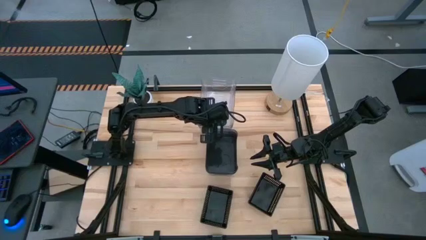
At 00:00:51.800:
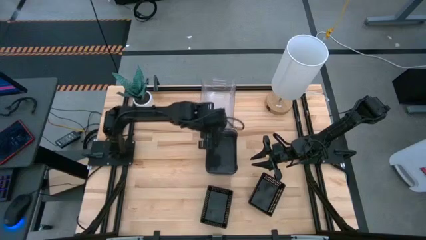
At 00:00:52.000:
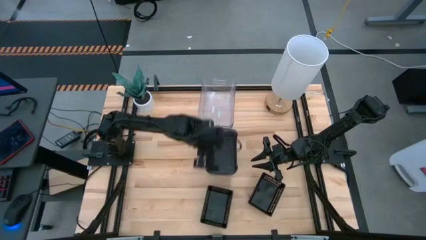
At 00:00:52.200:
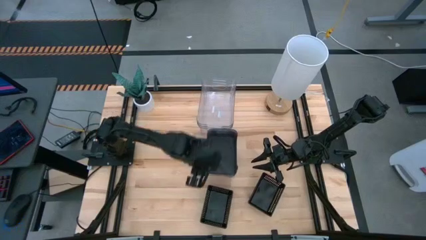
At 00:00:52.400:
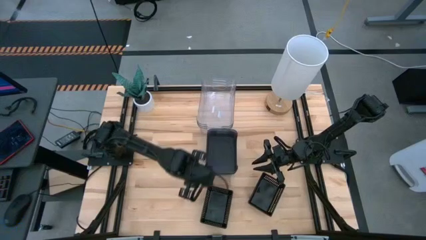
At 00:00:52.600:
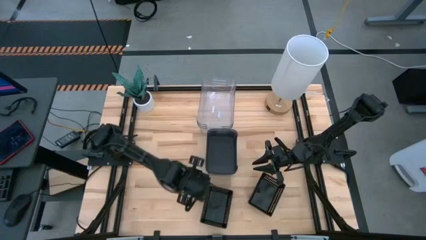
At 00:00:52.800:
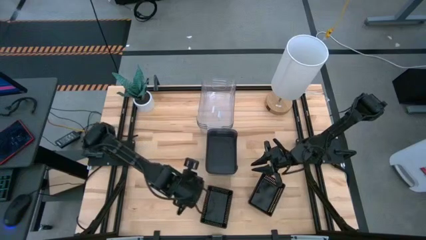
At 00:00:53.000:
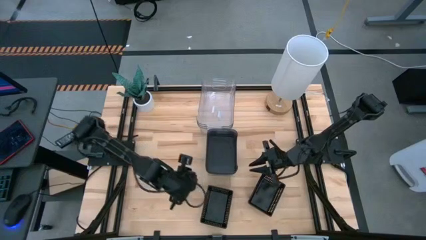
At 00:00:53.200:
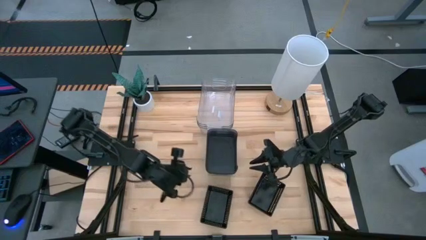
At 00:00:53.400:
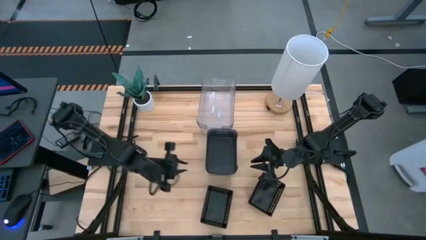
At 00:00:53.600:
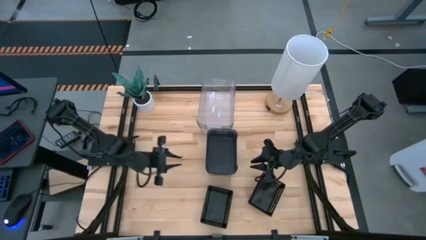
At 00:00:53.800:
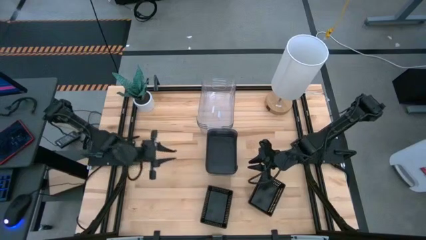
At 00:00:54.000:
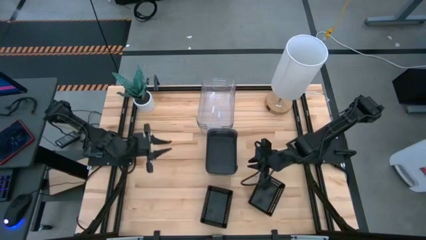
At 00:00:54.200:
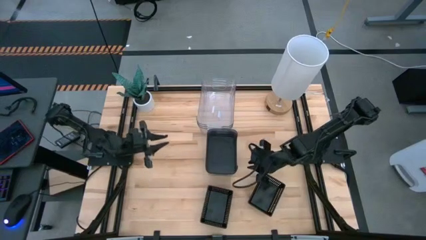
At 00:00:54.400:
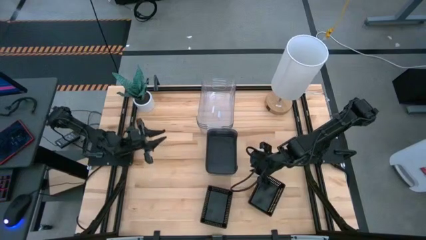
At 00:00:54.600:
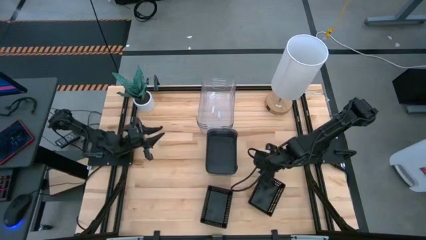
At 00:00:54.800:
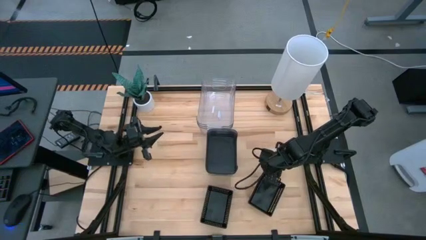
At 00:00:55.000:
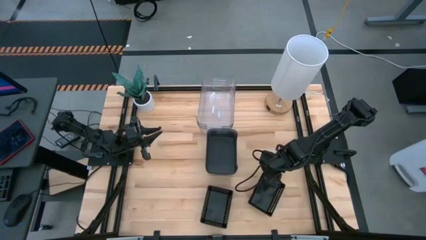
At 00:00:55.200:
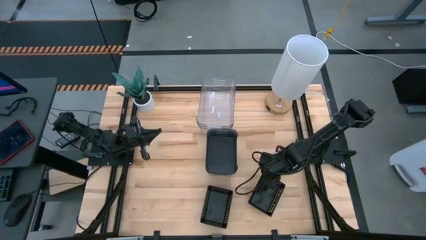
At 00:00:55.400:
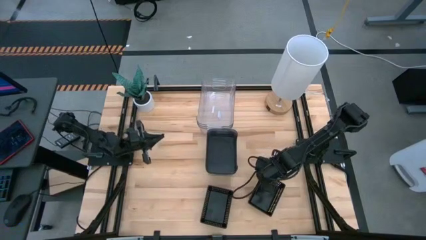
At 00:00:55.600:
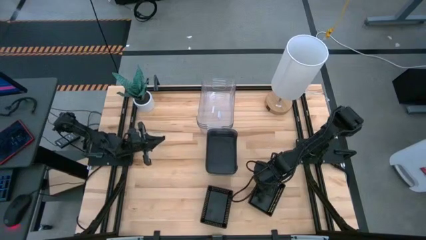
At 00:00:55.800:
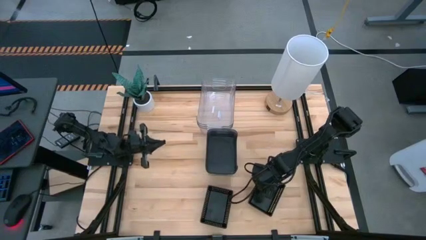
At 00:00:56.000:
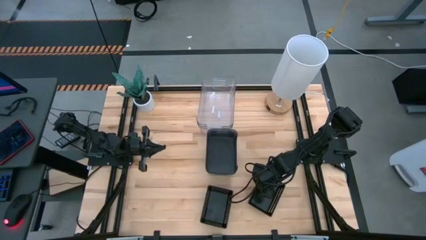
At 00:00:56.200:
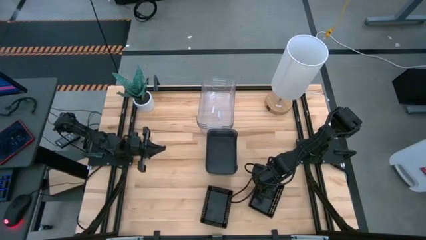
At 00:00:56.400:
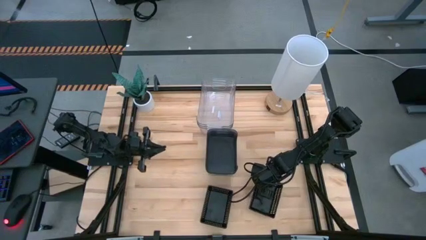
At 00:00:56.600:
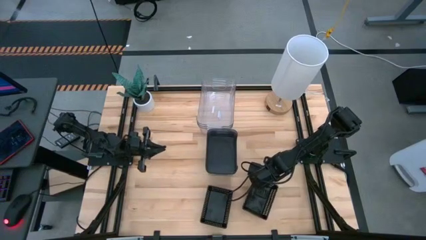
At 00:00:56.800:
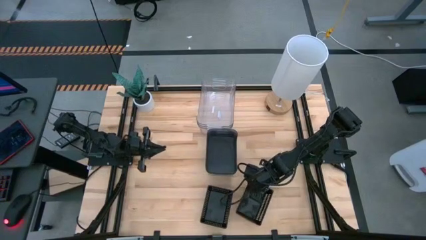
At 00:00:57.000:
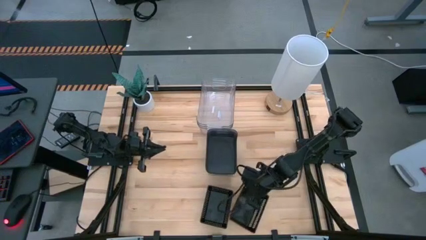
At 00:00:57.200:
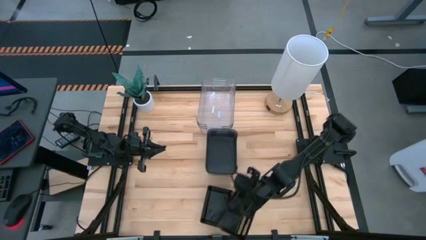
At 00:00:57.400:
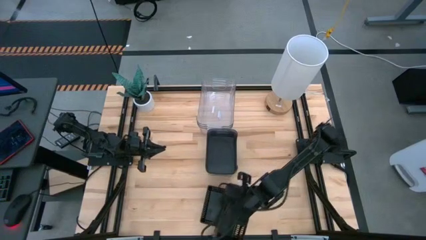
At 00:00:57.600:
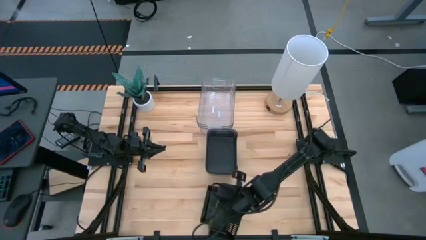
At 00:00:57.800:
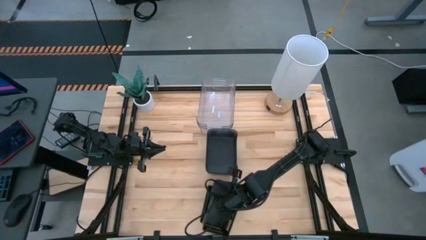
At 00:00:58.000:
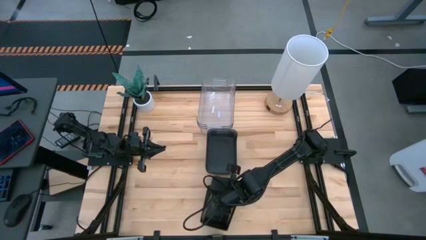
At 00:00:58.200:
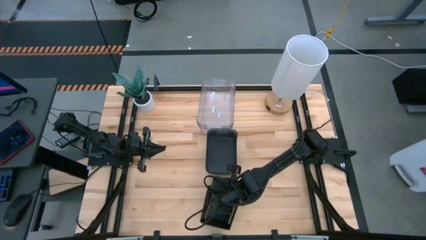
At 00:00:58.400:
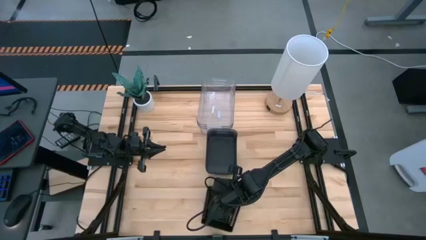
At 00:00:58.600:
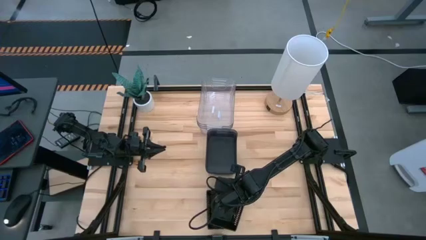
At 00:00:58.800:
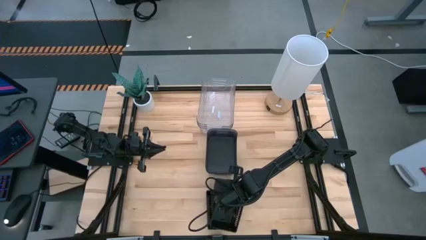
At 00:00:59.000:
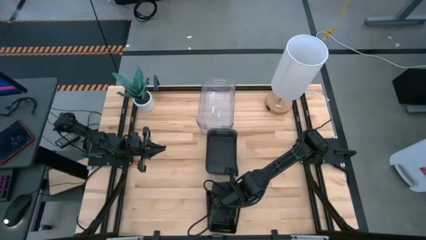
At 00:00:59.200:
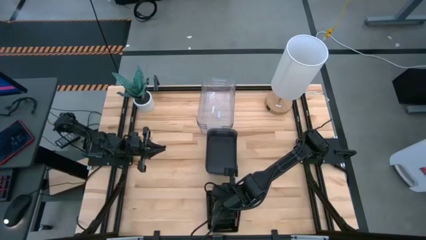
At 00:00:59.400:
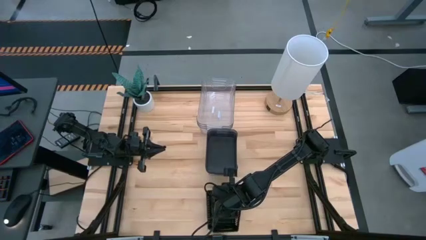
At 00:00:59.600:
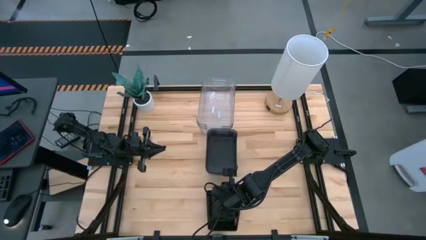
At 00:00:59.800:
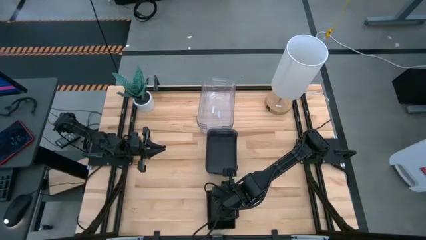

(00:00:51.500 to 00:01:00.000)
Stack the right black bin on top of the black bin

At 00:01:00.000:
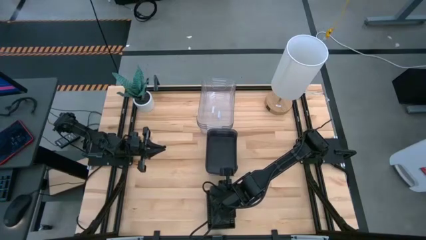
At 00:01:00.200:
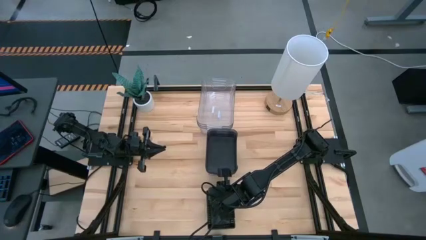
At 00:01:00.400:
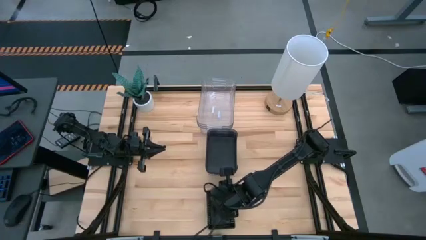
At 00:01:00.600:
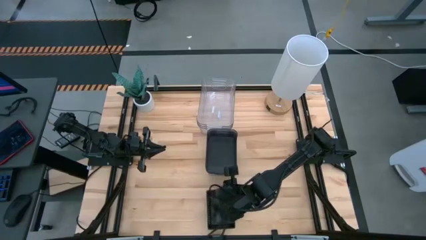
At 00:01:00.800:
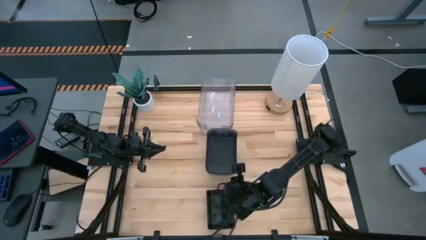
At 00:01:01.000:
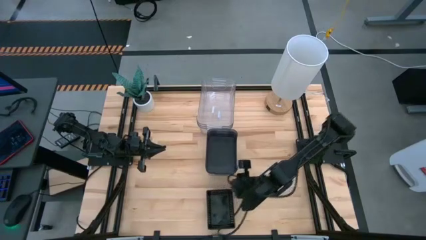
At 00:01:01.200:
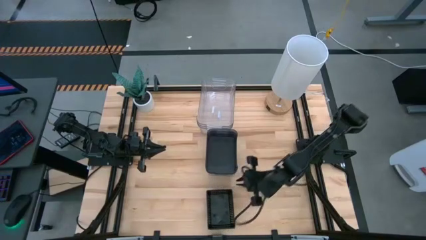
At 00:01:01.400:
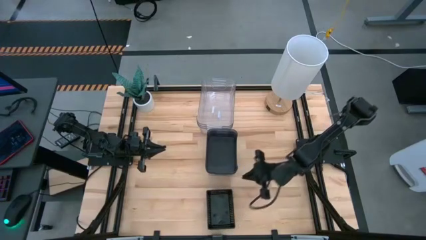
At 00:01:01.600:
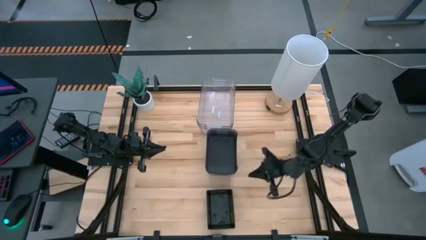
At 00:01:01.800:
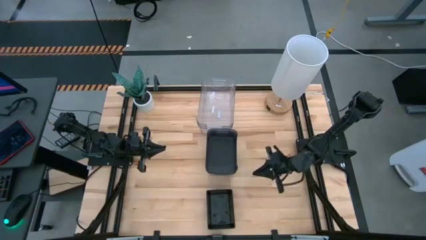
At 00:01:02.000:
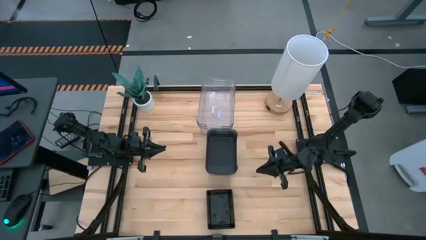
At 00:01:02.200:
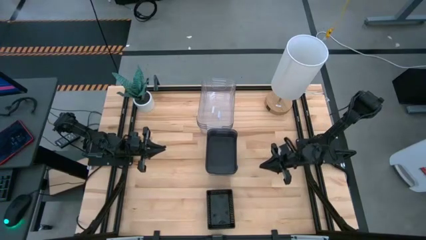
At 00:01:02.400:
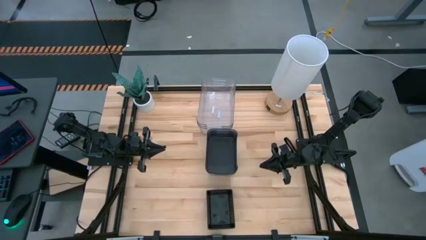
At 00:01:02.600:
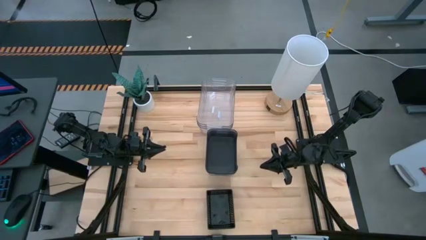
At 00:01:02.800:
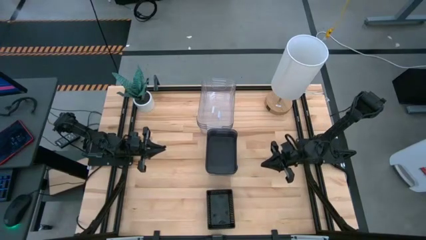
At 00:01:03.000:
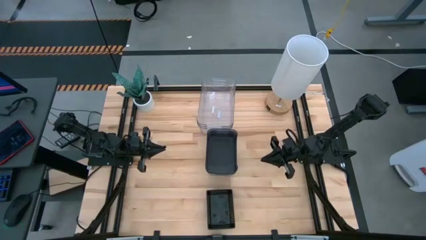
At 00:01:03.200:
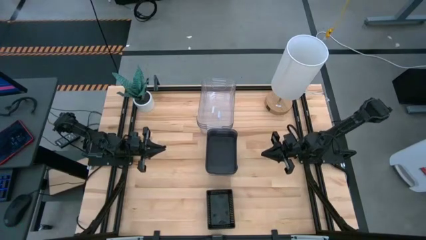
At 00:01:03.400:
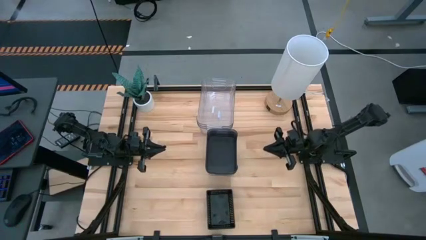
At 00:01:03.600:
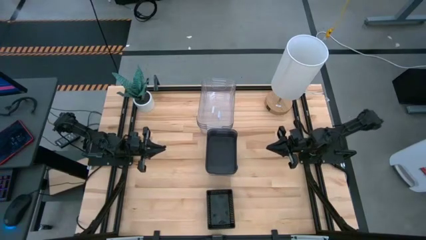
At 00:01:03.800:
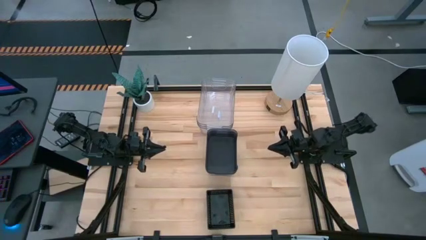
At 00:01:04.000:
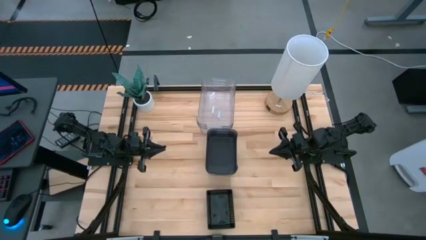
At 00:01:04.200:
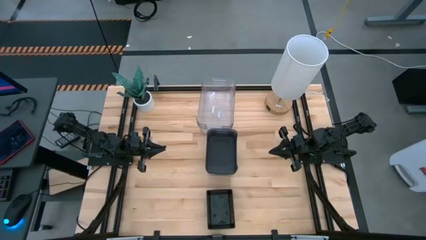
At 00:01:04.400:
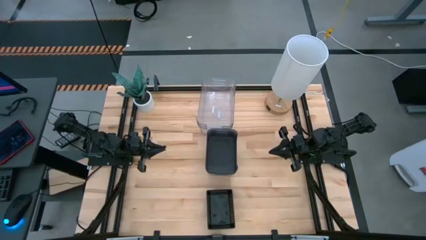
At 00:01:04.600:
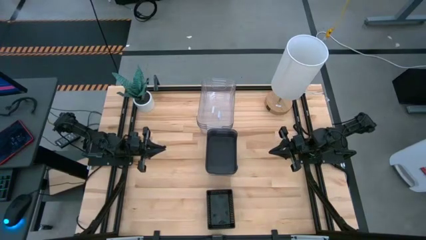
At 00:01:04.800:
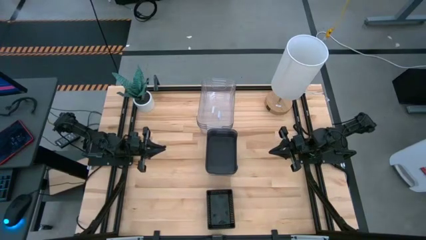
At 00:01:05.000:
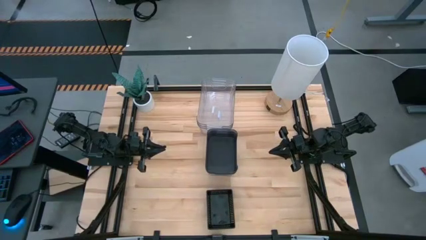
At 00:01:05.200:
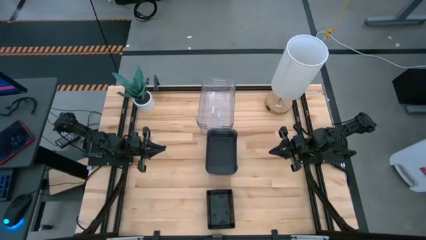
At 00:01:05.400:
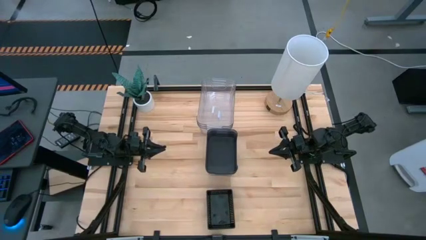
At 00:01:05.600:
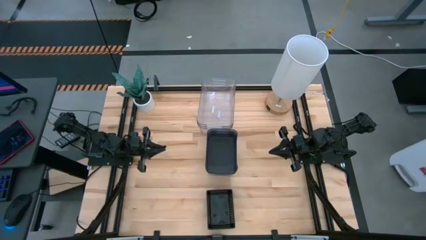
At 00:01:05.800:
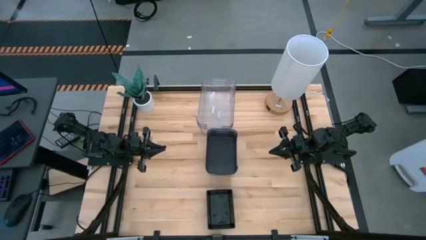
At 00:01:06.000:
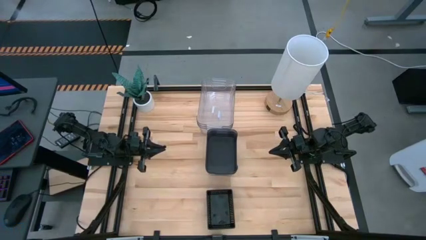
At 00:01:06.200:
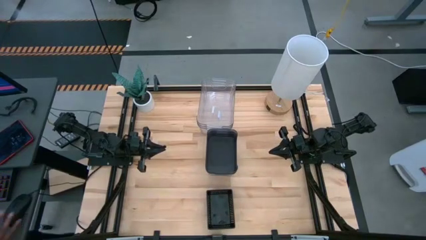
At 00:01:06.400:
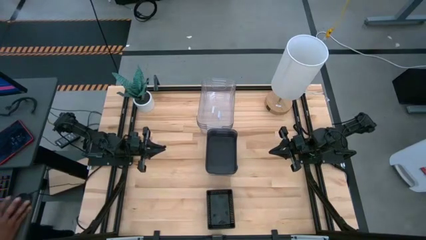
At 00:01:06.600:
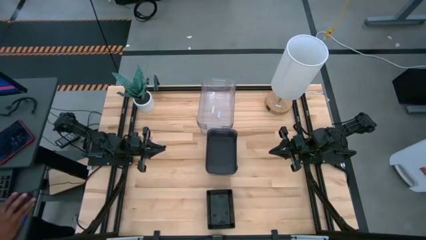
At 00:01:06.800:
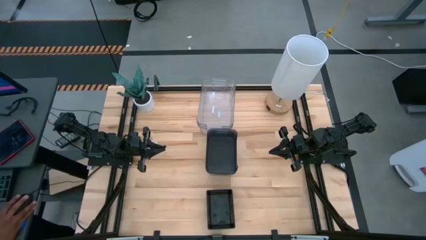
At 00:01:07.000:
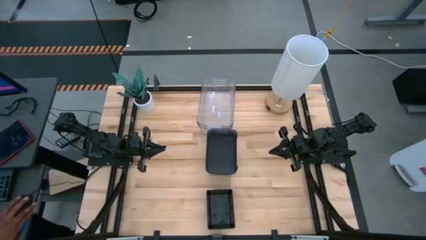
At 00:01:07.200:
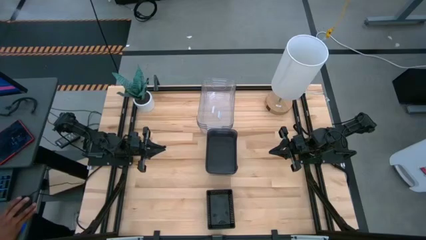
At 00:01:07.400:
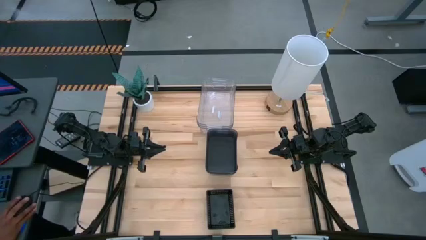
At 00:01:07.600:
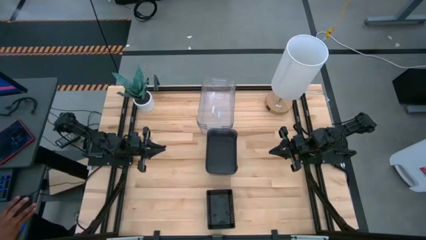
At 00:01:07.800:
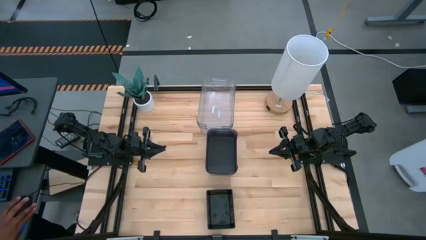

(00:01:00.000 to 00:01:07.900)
Return to Home Position
